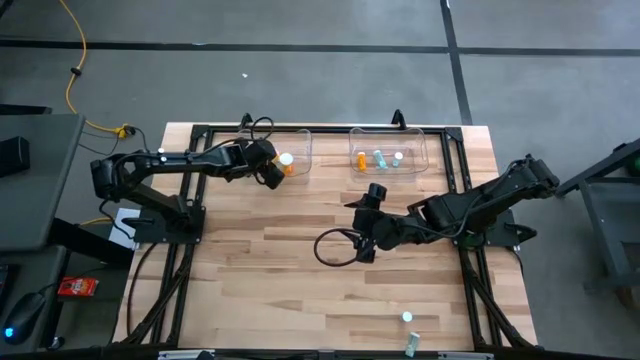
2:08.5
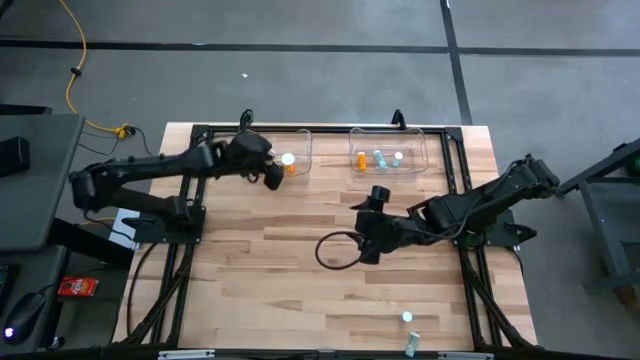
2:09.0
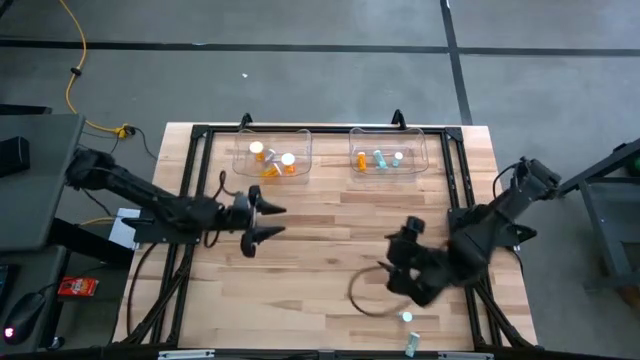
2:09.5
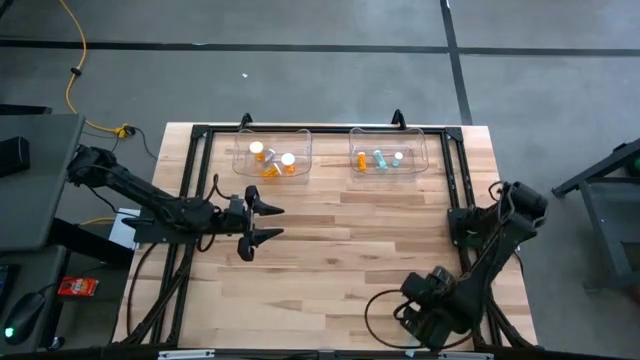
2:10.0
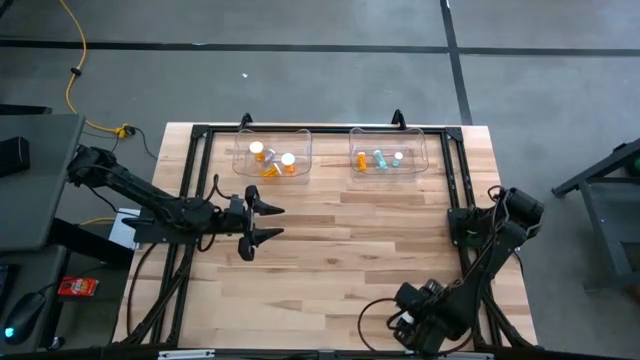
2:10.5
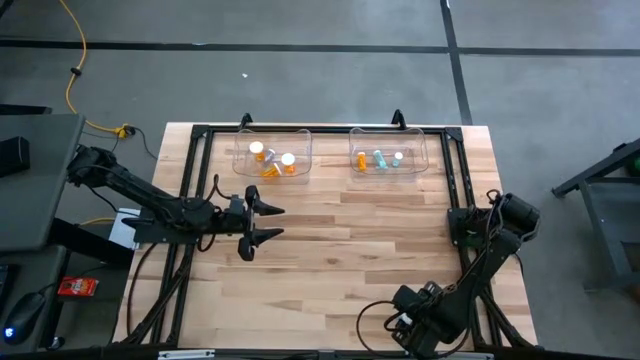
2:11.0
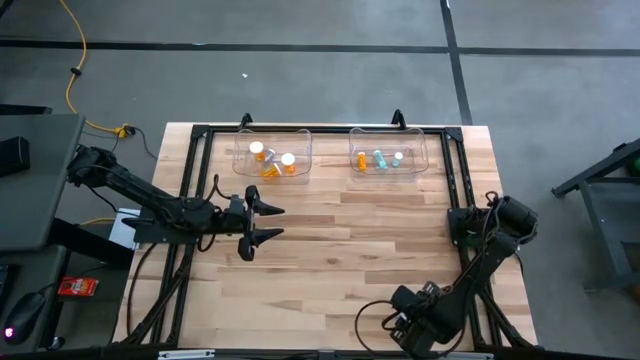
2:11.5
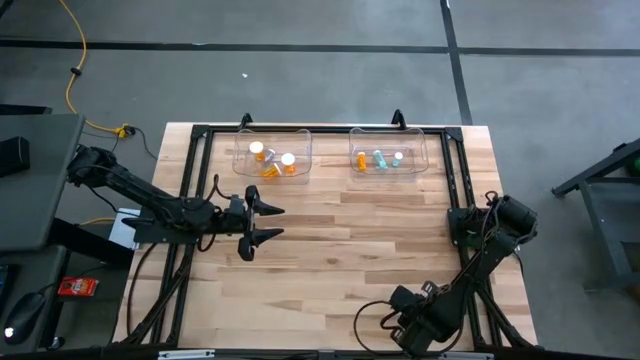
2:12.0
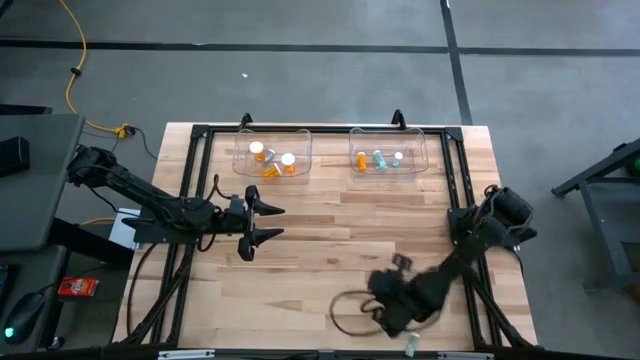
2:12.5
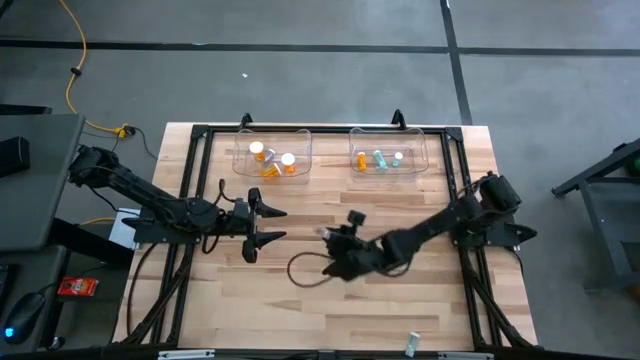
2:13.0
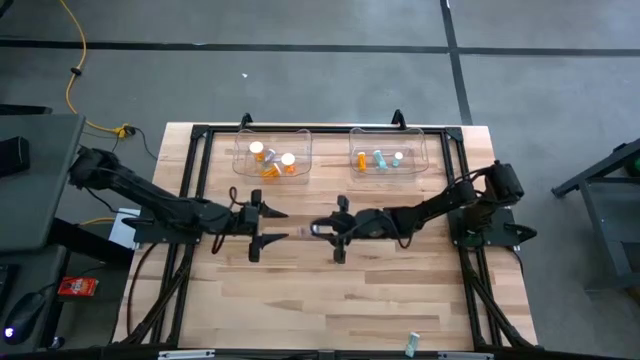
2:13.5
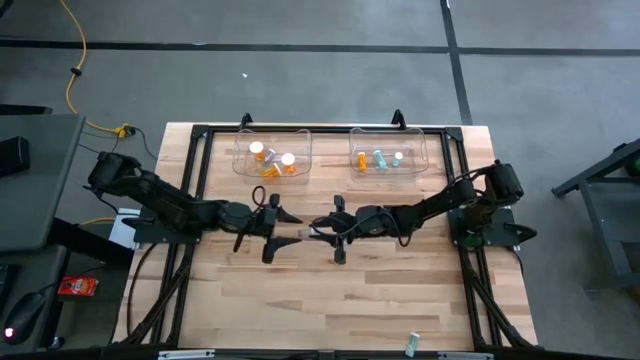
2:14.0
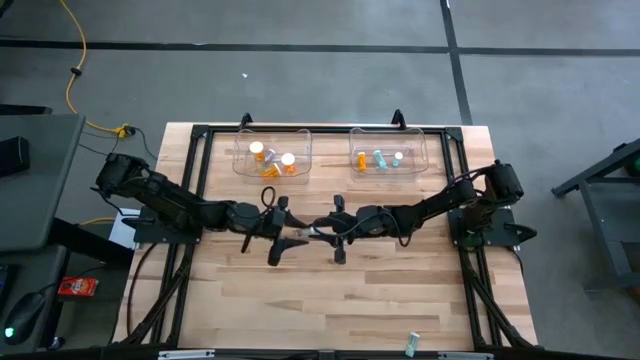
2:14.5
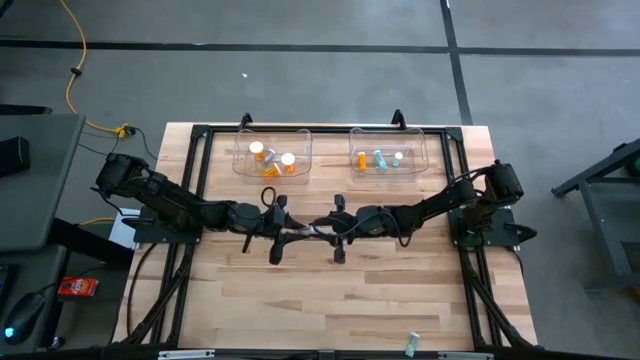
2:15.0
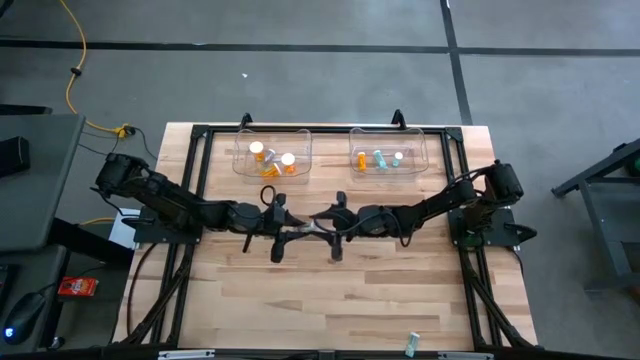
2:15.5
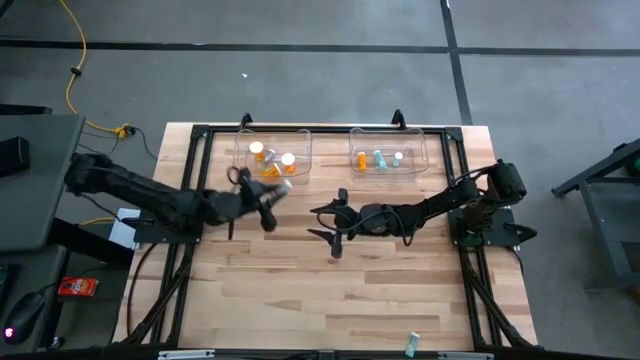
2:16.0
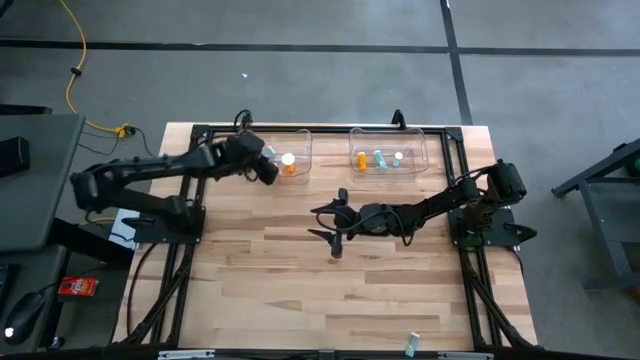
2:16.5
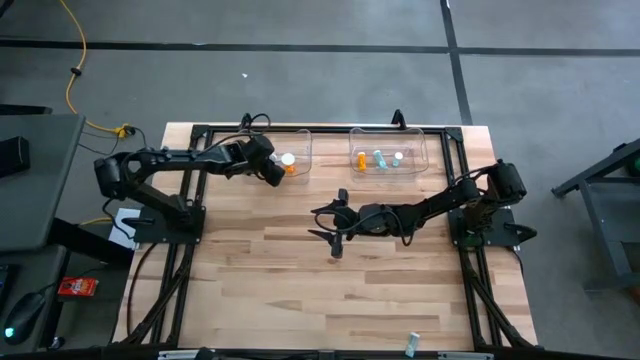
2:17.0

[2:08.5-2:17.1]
Task: Pick and place medicine bottles into bin by pill shape (circle, oval)
Put the blue capsule bottle into the left transparent bin

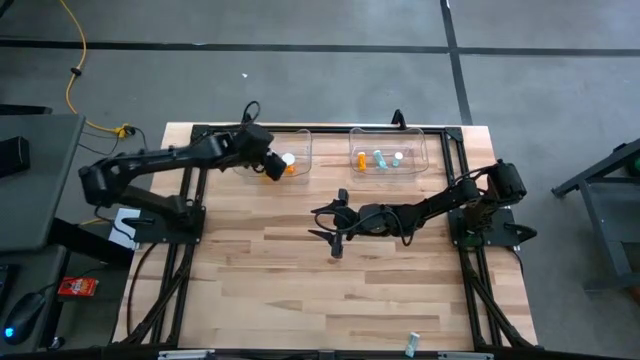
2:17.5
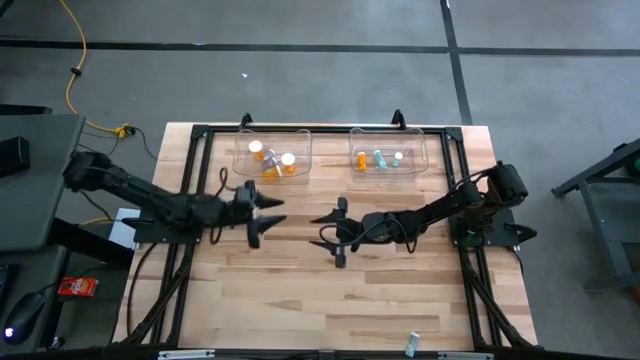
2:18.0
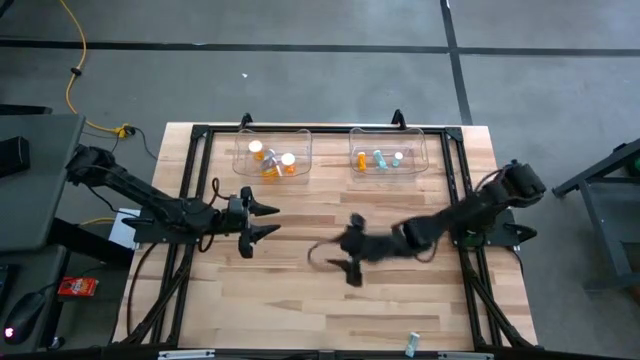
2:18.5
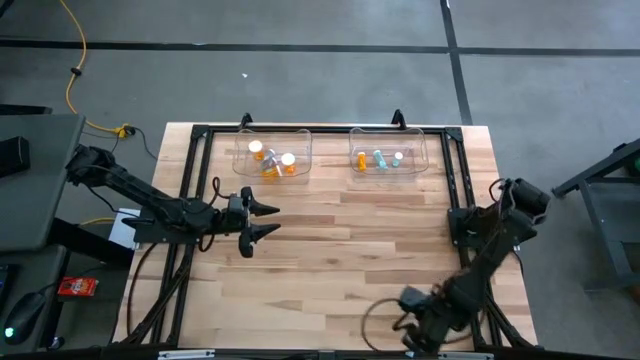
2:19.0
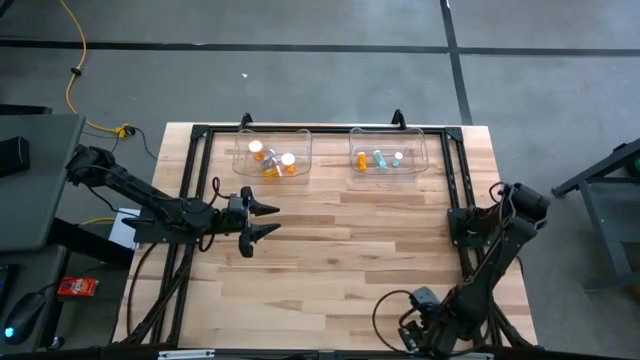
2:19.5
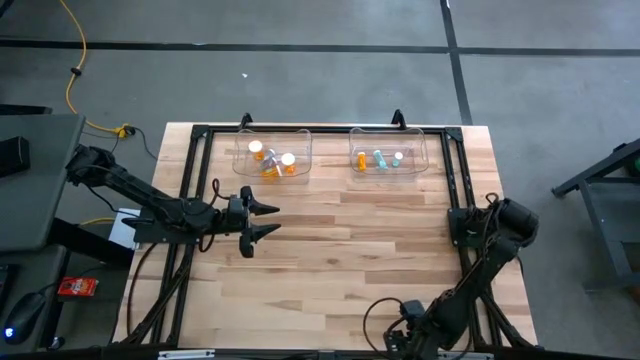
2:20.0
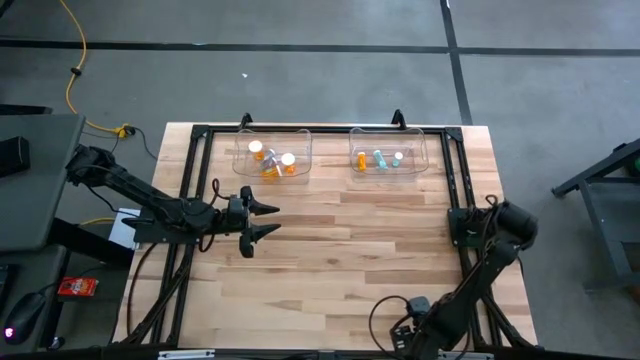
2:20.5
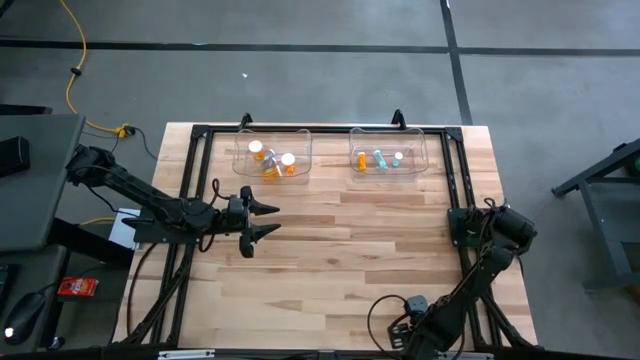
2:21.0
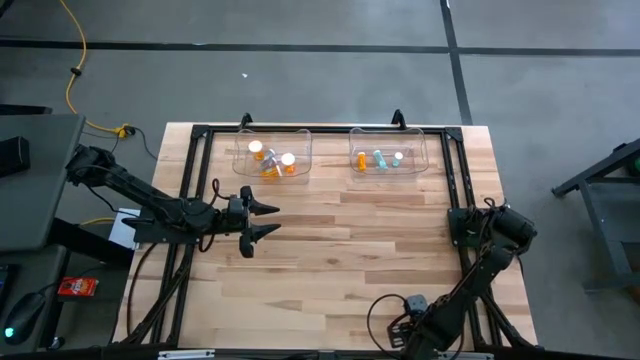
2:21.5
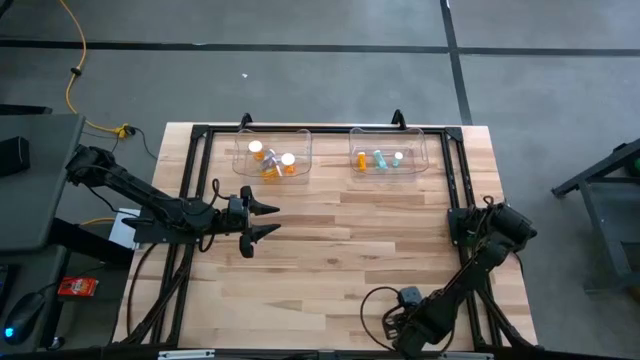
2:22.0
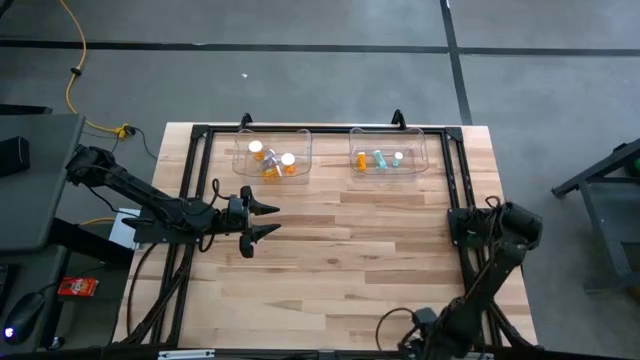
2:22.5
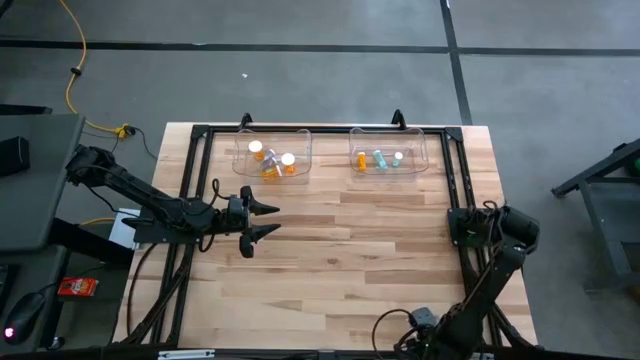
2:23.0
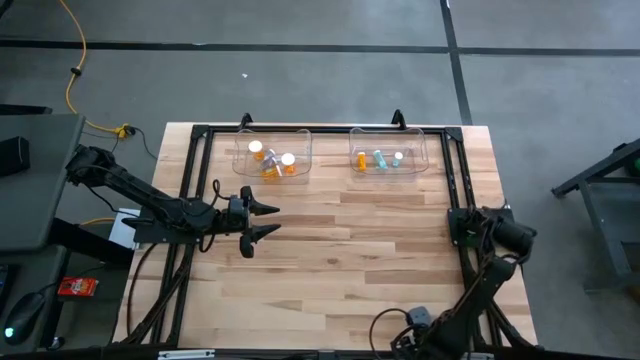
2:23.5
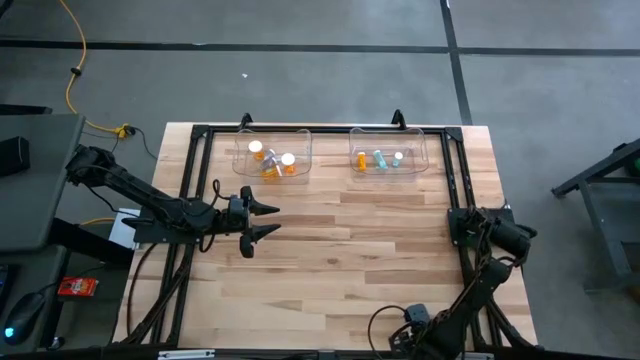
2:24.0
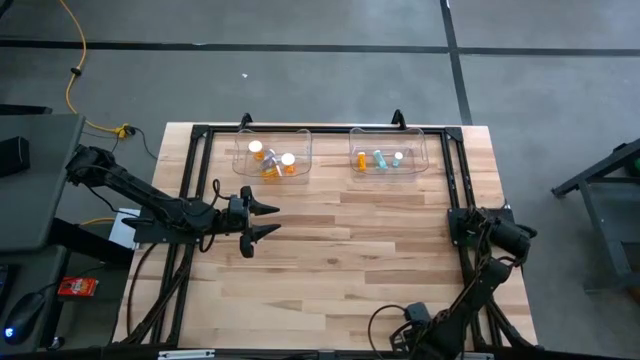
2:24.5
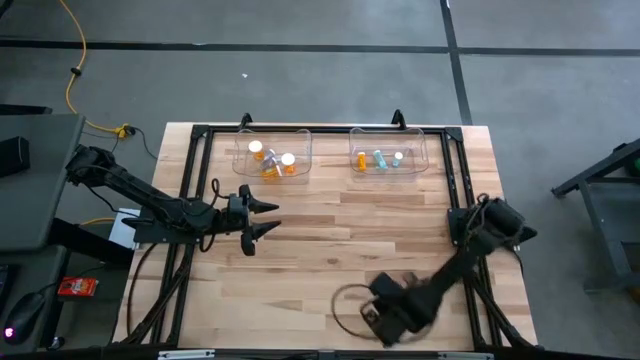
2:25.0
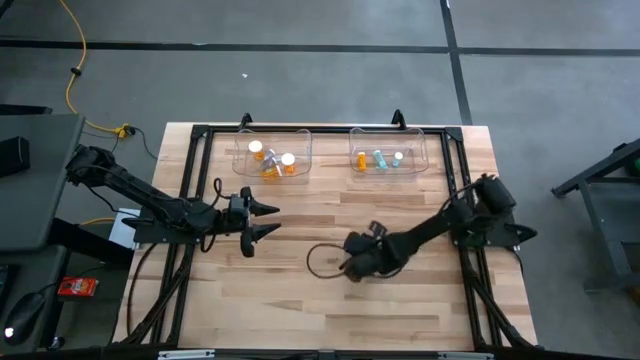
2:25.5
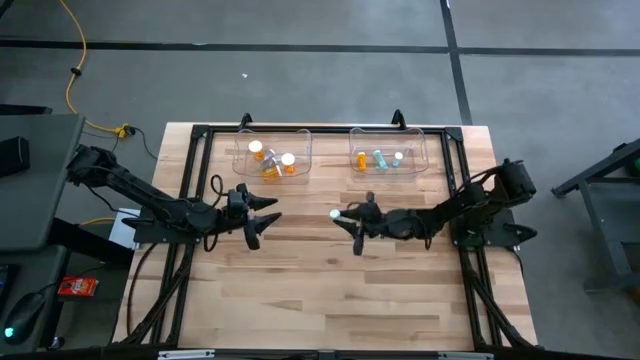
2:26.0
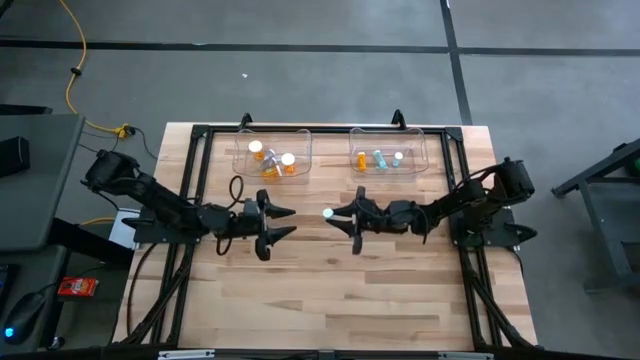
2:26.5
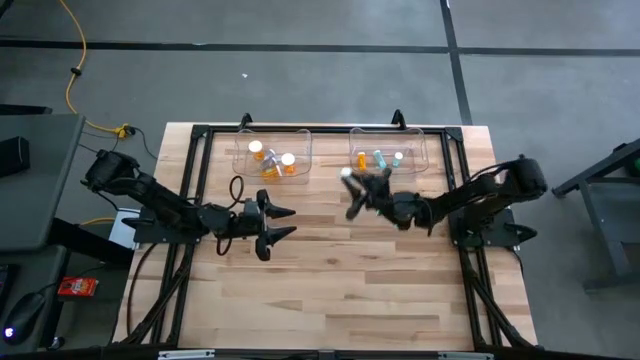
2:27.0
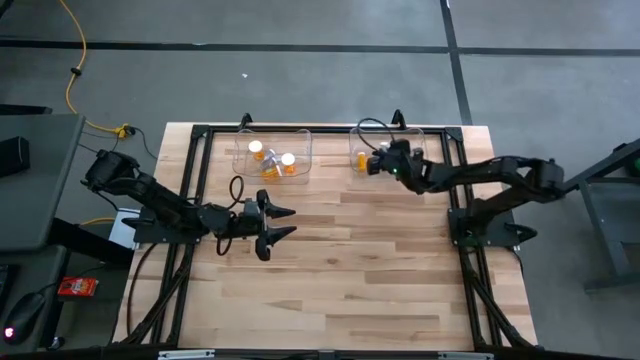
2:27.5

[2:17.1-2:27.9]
Put the blue tablet bottle into the right transparent bin

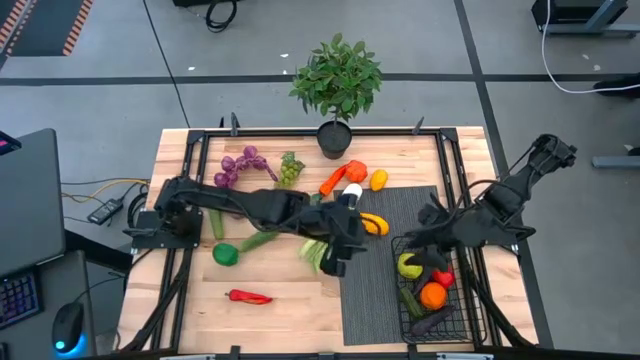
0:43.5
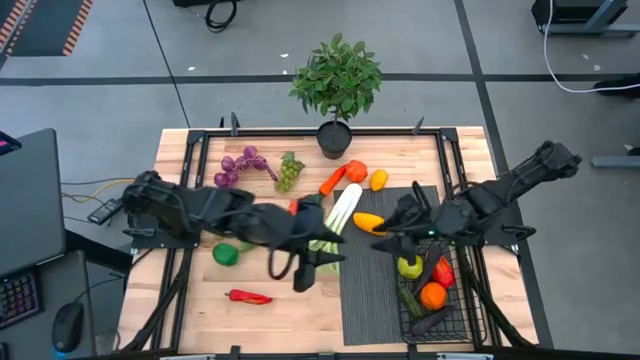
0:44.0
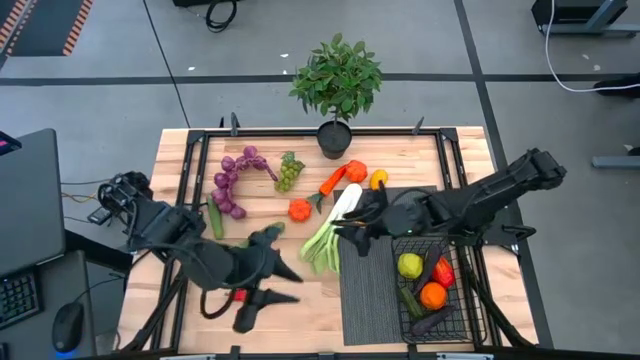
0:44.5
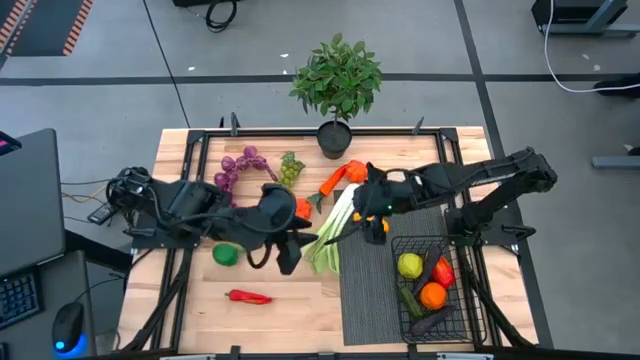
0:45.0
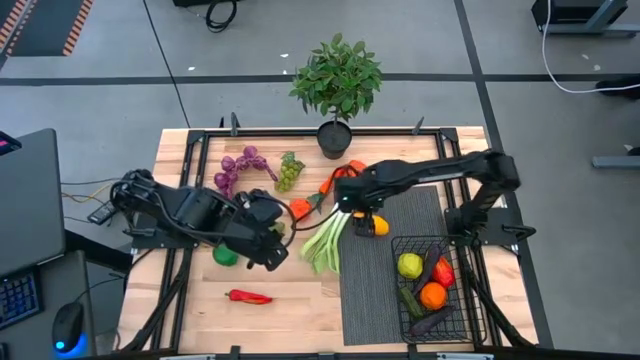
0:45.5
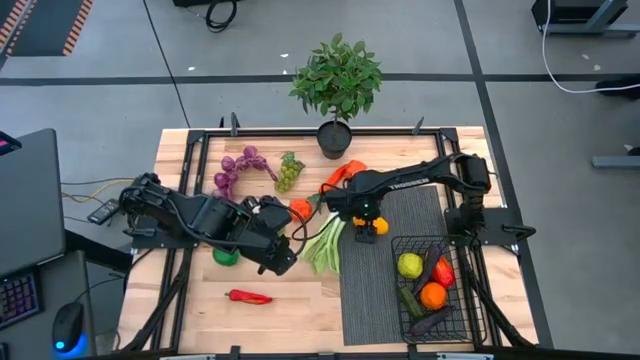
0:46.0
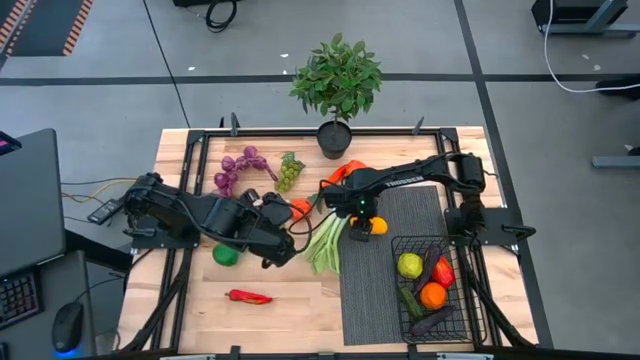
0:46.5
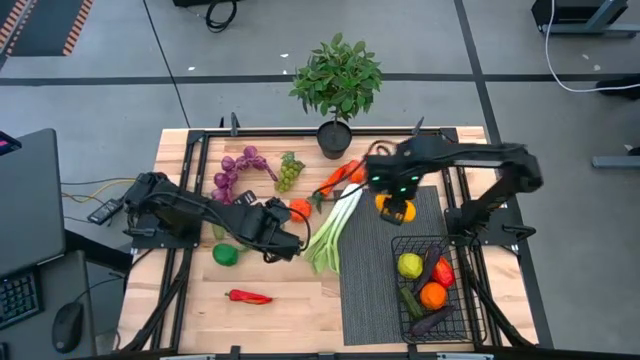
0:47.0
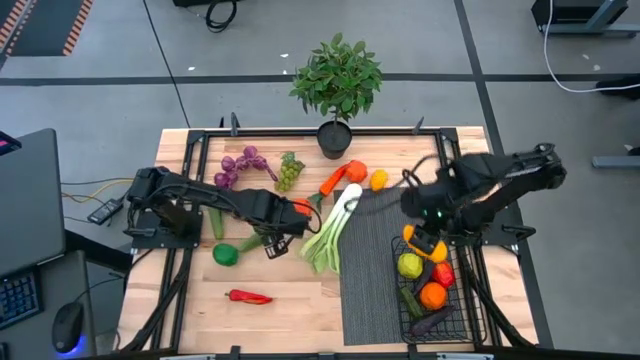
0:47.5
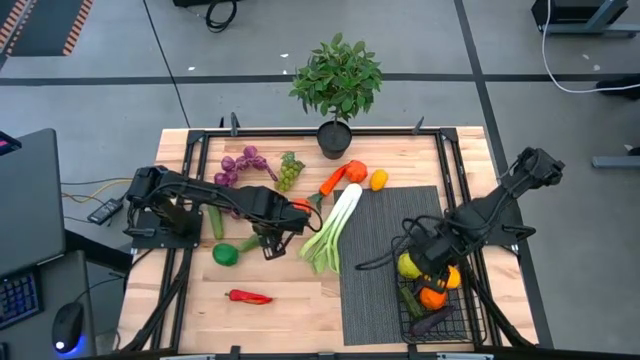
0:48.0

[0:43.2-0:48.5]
Task: Build produce basket
Put the bottom mango into the black basket
